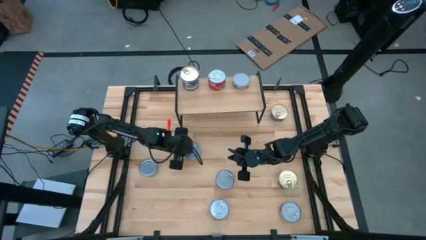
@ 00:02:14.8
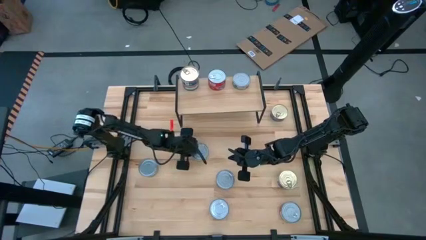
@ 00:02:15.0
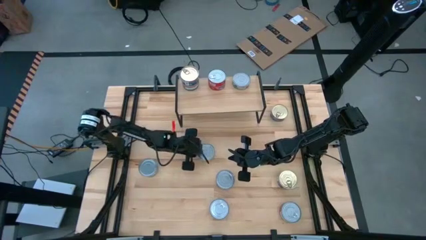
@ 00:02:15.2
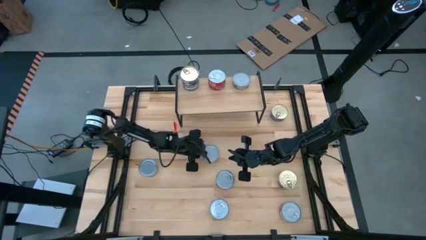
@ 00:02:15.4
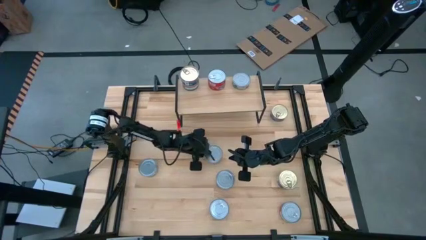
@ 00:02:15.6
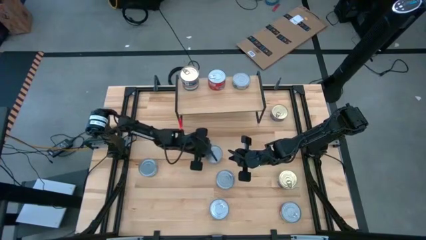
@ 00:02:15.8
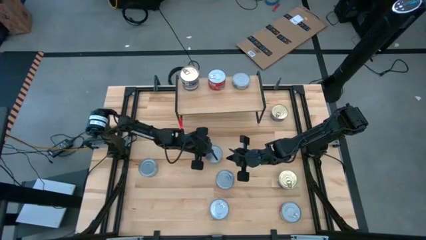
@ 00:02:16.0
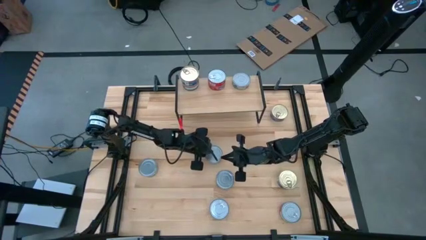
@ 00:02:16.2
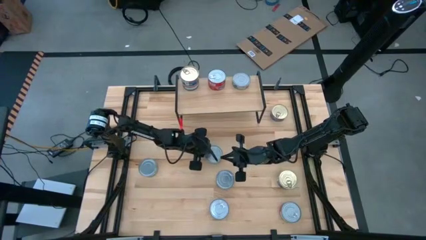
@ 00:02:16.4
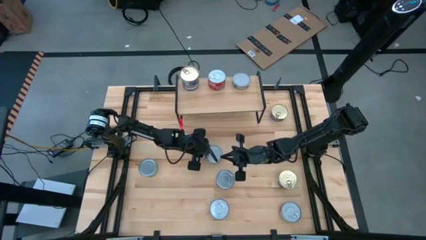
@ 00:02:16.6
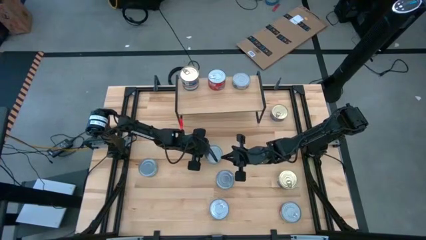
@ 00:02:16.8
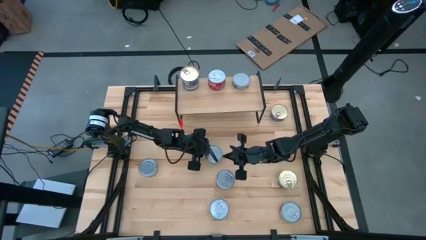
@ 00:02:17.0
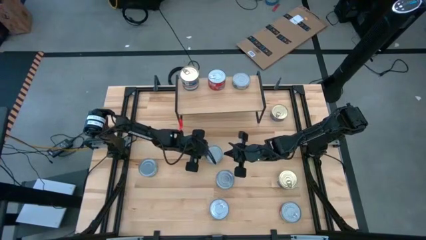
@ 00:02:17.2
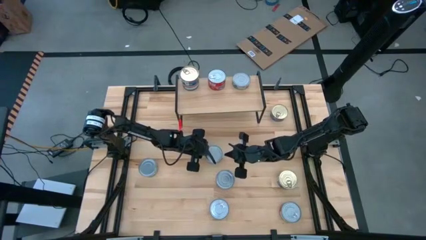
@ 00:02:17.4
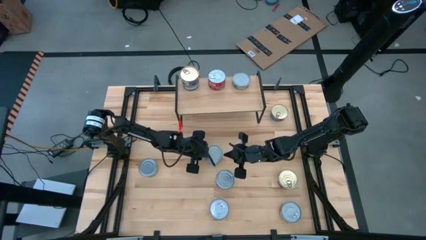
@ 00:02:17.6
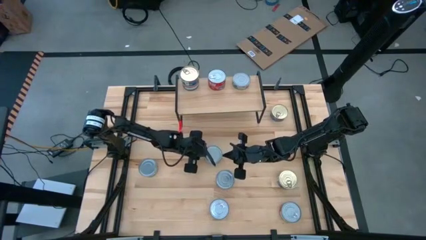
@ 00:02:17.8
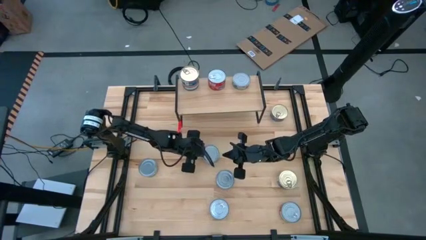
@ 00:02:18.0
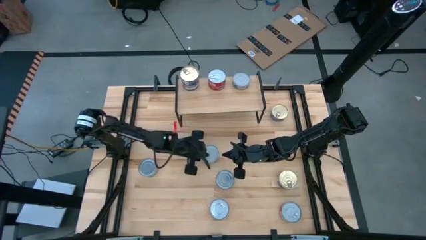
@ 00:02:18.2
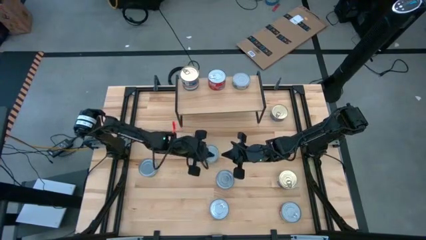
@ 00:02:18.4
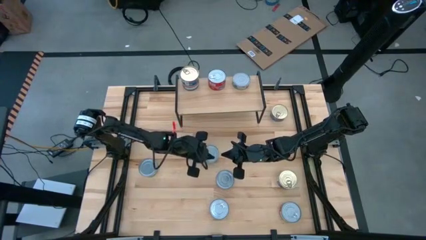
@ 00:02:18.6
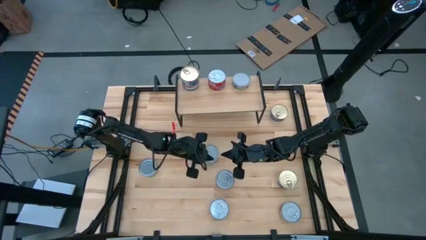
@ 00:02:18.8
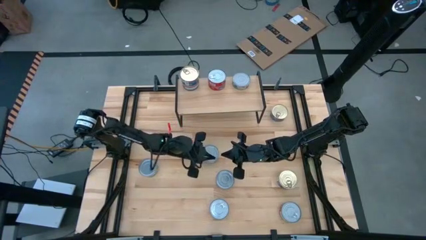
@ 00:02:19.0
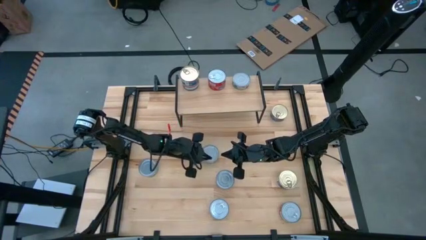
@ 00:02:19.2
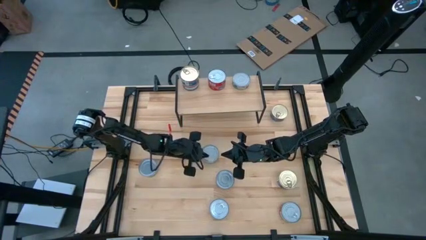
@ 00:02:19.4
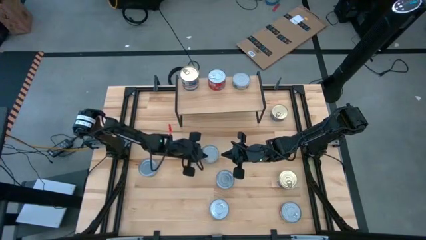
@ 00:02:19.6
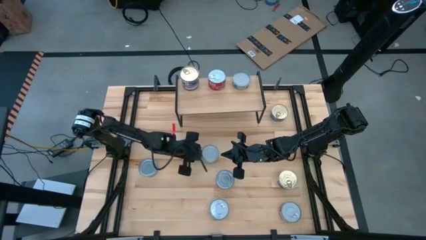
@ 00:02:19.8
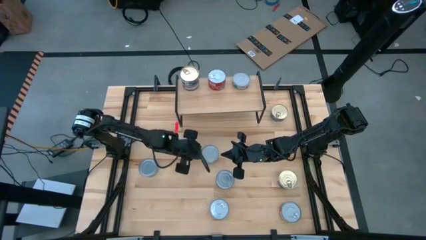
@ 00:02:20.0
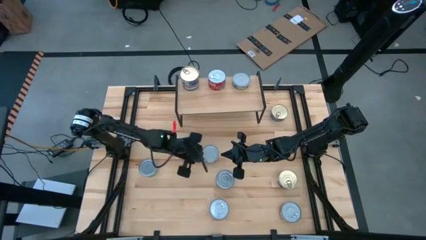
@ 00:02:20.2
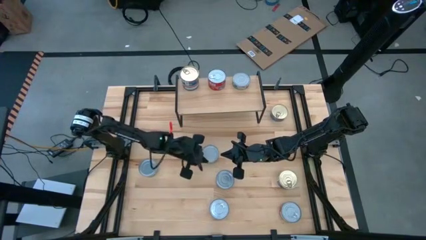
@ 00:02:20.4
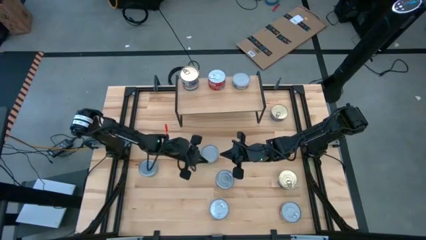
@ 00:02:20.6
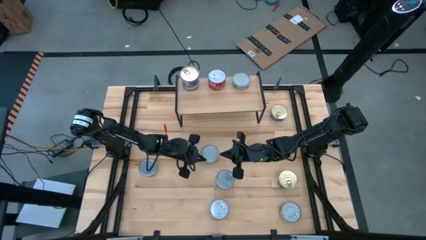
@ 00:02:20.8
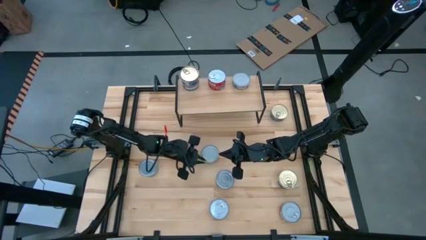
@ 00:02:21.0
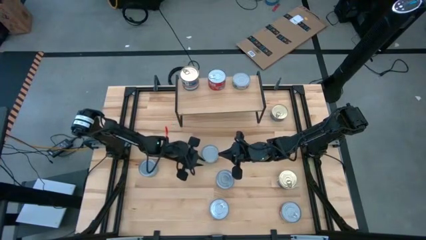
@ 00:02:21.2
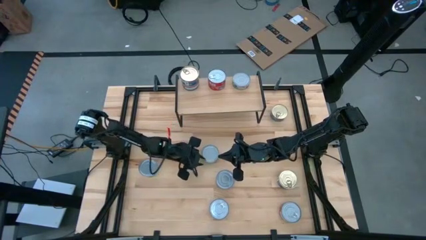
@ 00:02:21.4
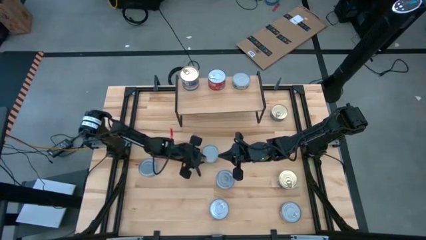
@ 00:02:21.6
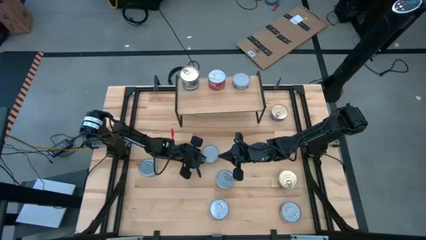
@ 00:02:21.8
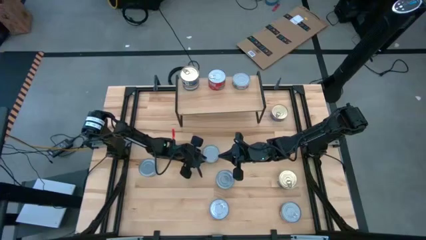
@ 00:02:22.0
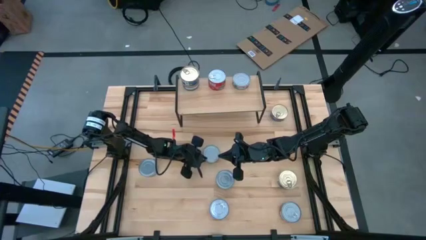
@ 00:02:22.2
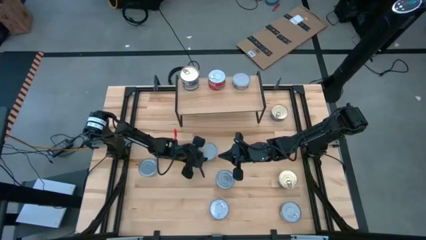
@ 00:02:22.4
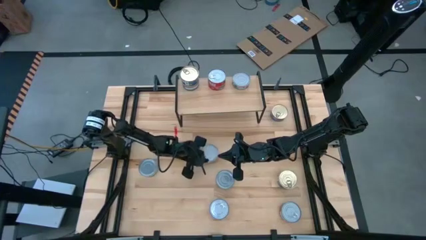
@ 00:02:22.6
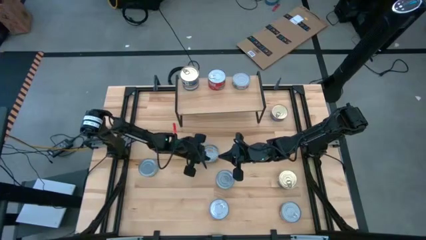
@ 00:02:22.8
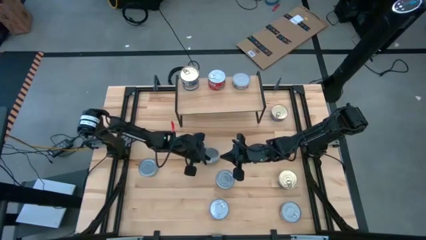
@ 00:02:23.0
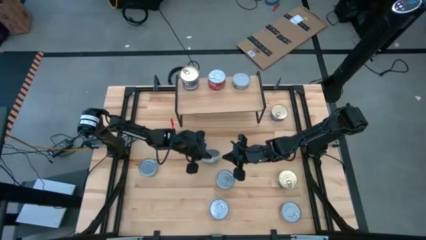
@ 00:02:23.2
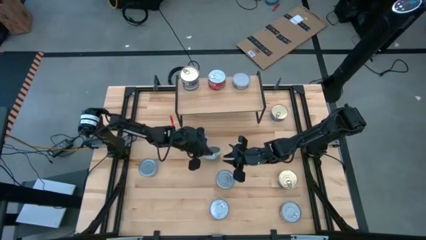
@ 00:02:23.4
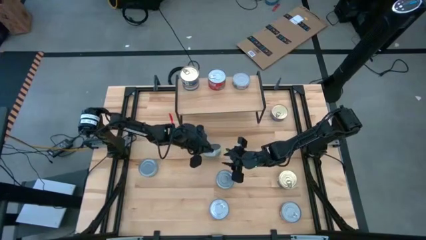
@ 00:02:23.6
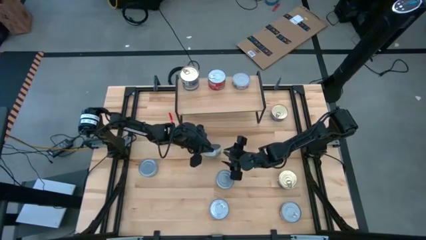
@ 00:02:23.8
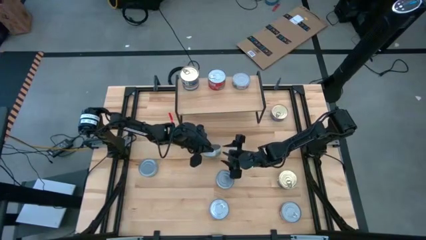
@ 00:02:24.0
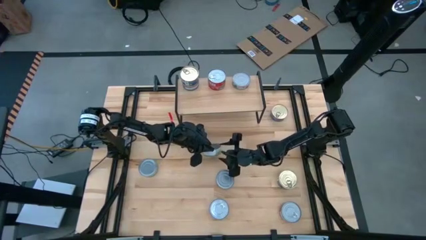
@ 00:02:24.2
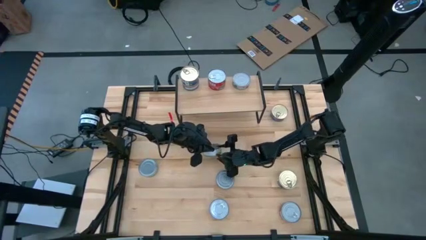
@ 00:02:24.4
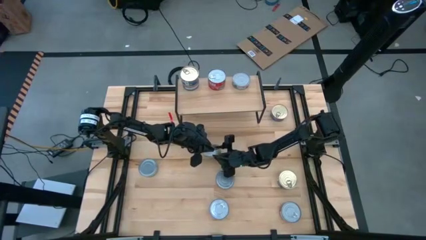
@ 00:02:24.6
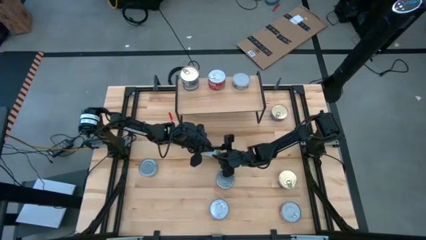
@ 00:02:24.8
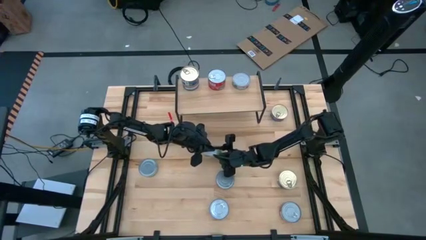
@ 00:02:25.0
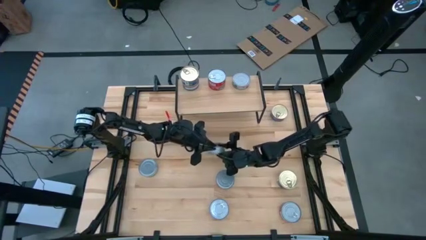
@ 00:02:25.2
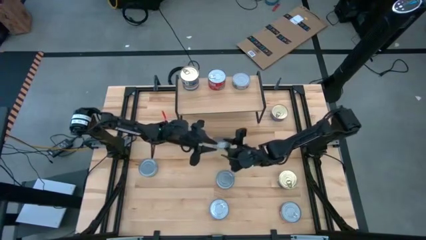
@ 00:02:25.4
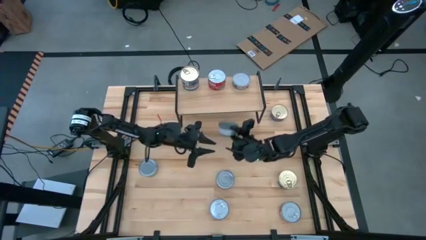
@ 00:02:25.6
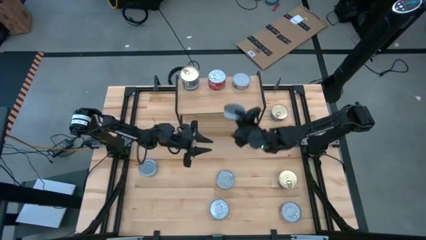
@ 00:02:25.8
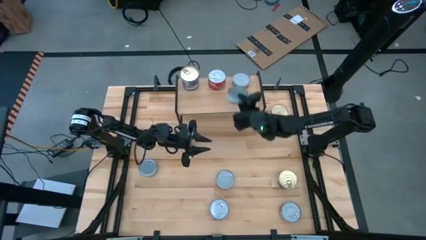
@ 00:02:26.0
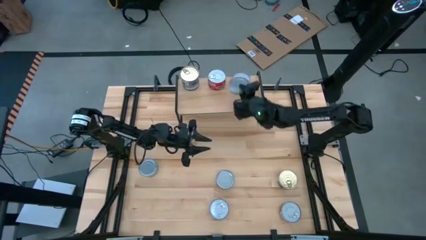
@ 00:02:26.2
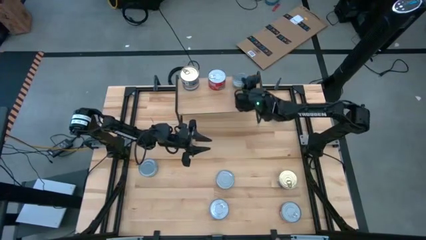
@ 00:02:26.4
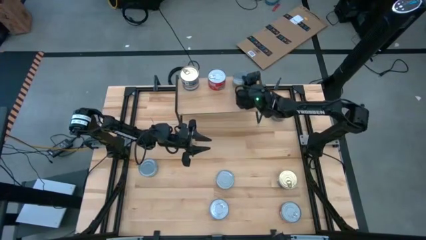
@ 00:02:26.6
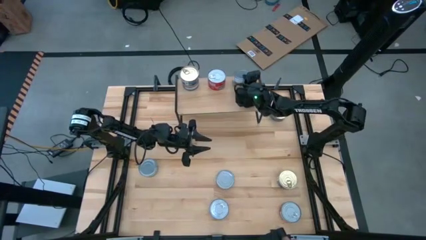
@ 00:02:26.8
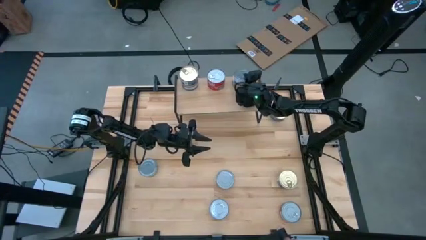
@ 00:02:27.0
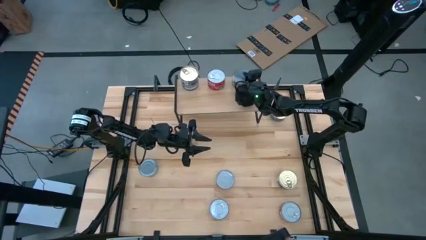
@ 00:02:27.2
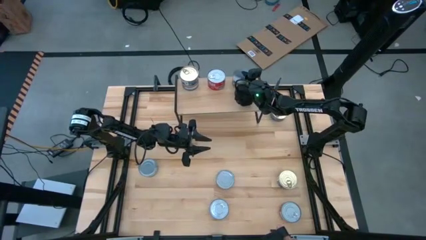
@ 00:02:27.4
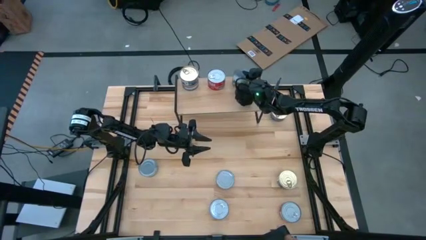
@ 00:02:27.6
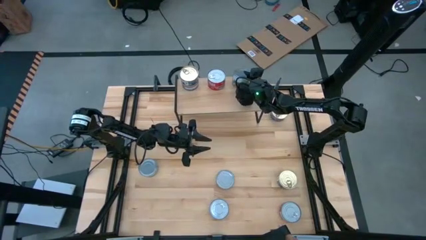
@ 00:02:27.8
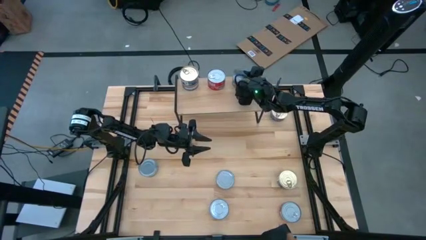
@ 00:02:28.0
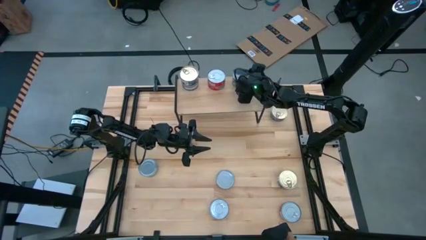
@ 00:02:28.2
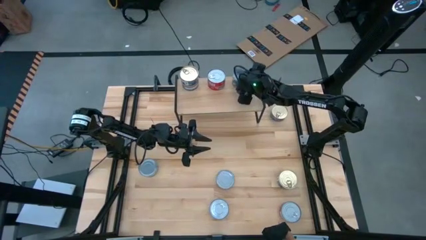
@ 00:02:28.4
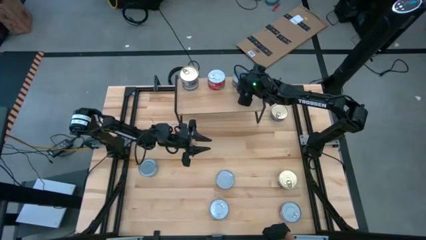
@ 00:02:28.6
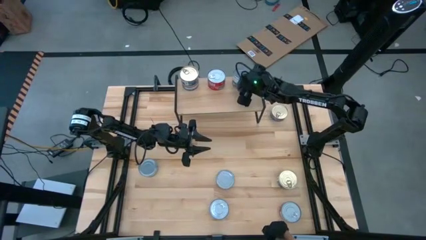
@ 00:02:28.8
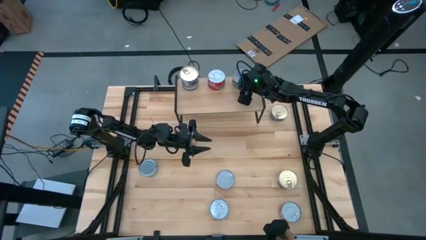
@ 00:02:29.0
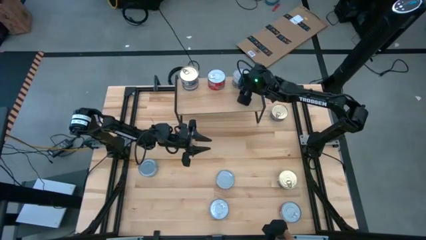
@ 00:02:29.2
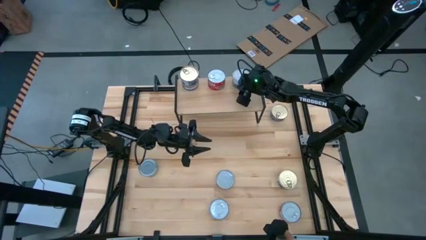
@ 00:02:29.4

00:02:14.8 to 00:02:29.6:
Task: Stack canned seafood by type on shelf
Stack the green tuna can on top of the other green tuna can on the shelf

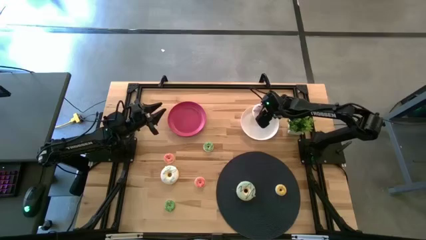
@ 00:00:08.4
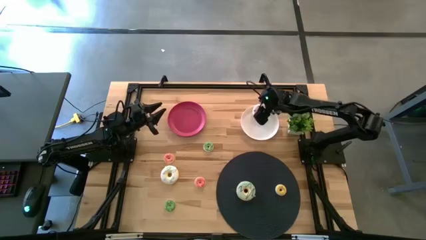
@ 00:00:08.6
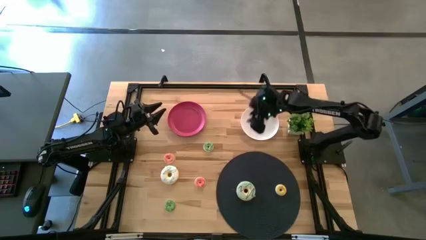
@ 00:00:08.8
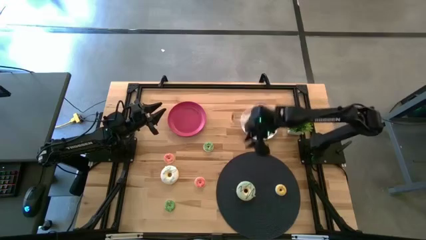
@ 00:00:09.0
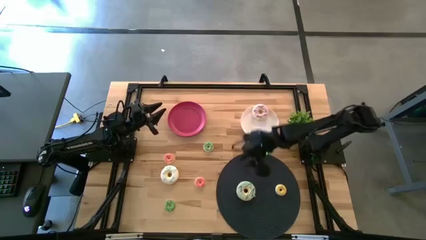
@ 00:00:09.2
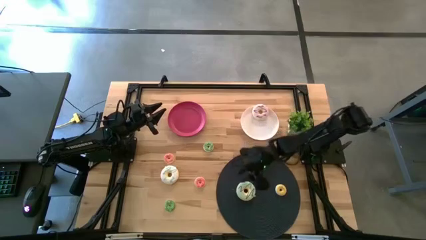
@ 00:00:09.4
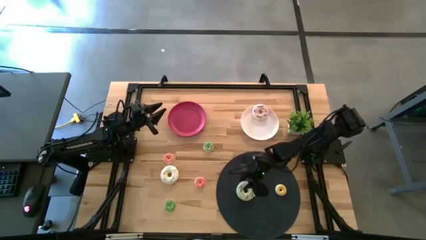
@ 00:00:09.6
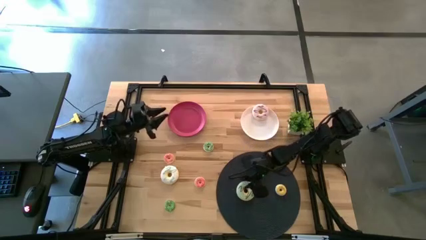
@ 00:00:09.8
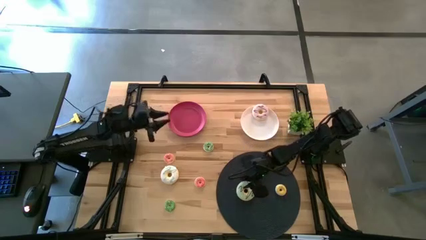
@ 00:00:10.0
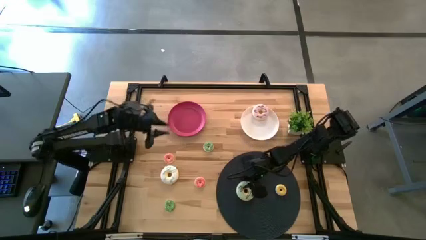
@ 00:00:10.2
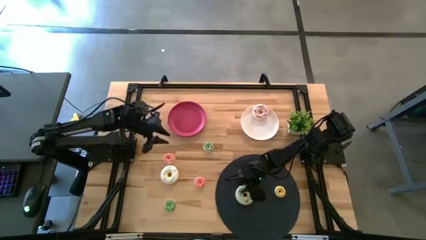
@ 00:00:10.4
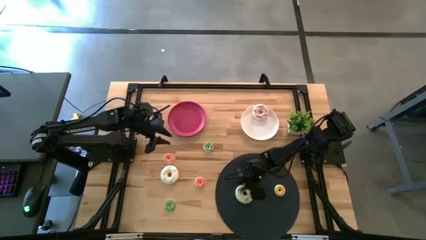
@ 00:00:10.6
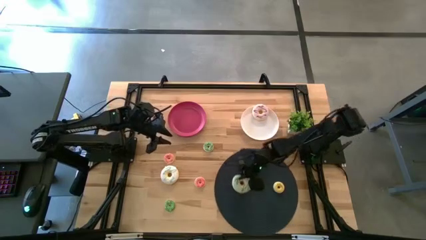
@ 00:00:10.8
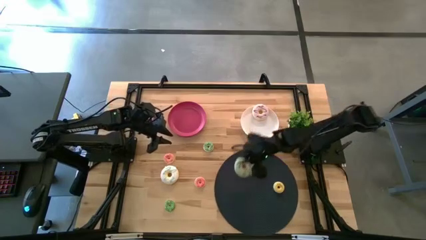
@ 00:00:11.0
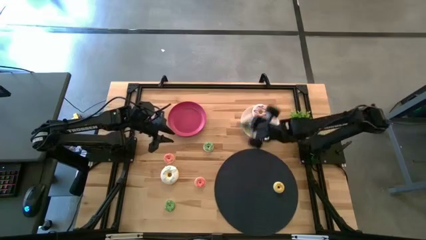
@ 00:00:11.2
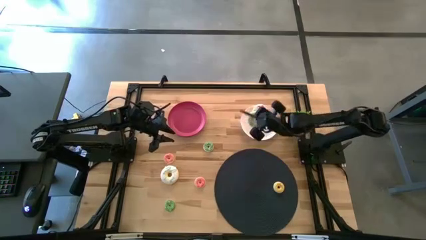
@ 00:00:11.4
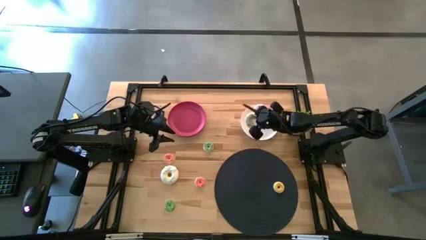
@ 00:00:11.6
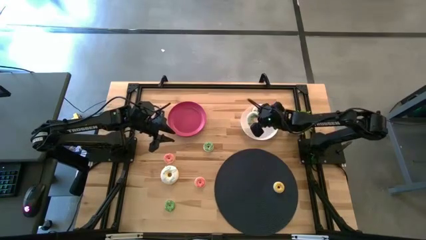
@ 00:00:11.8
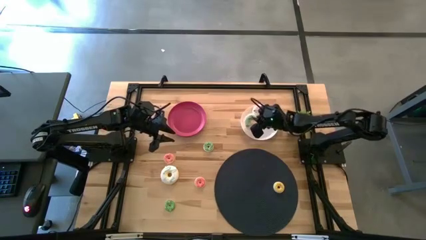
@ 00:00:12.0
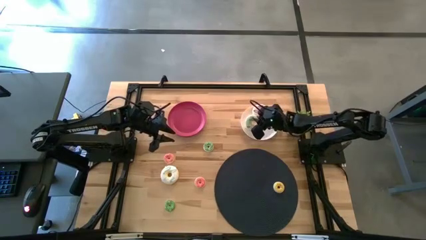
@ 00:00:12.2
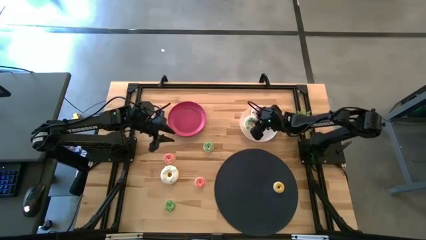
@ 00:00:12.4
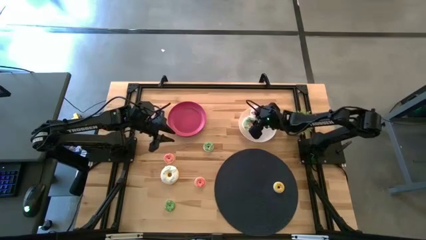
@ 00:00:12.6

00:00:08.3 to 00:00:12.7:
Task: Pick & Place donuts
Put the large light blue donut on the white plate
